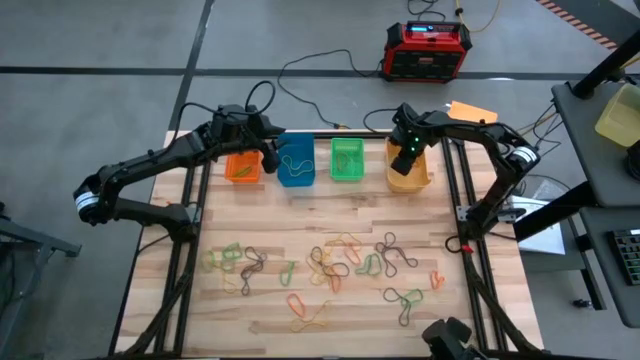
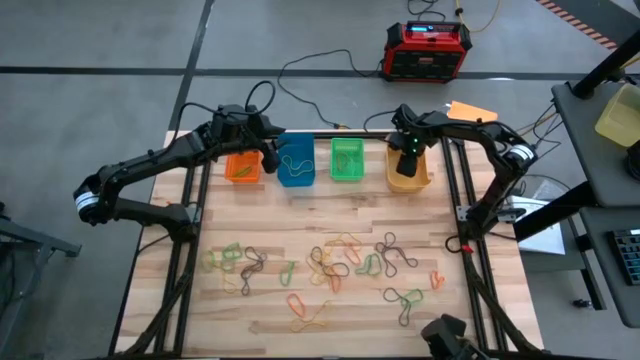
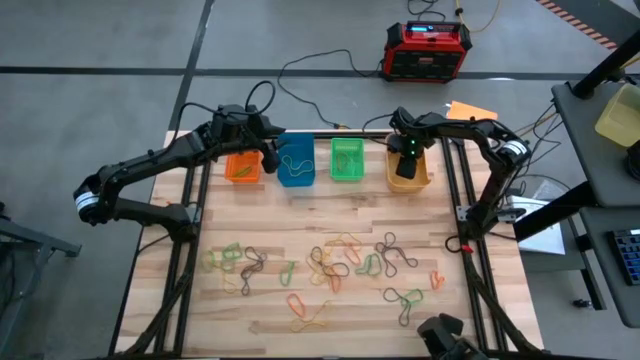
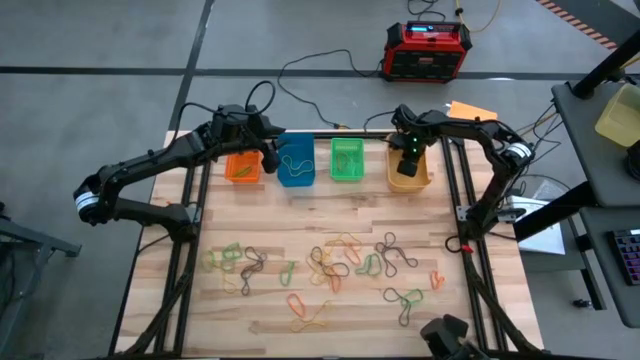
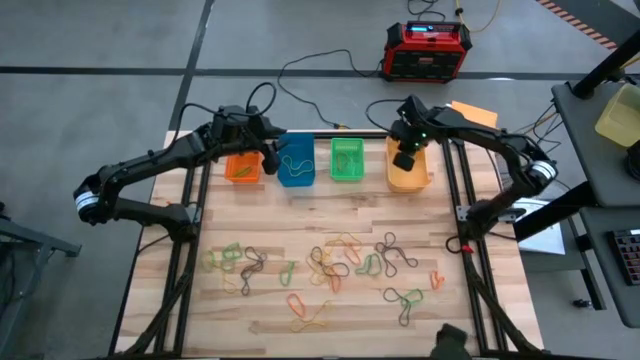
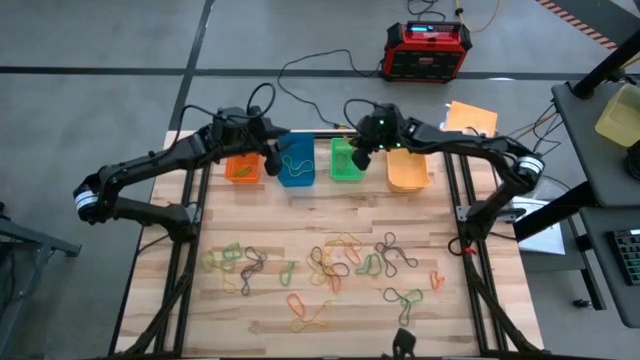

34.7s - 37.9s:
Task: Sort rubber bands into baskets
Put the orange rubber band from the light orange bin into the green bin

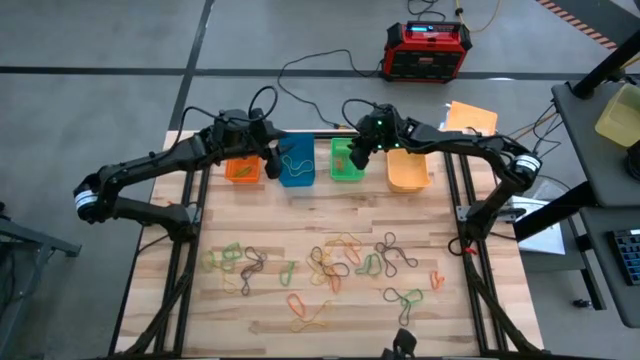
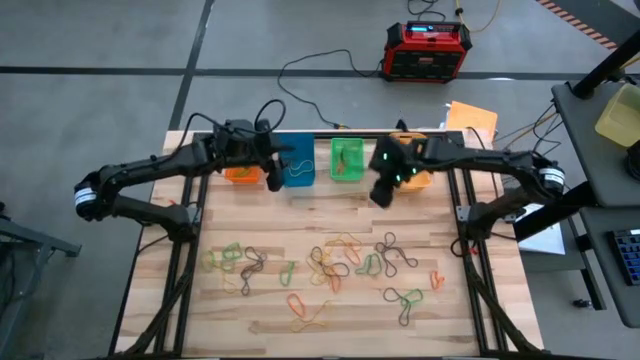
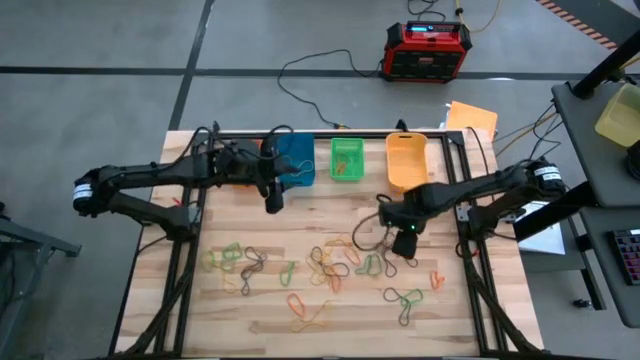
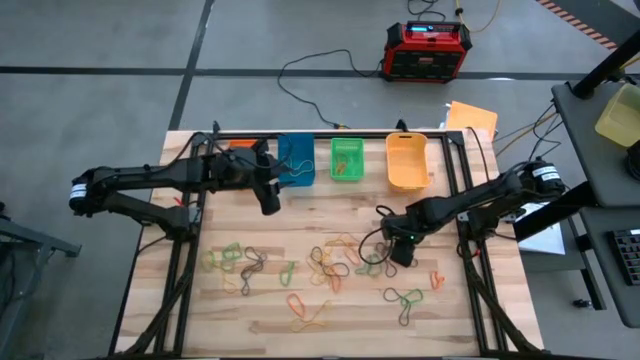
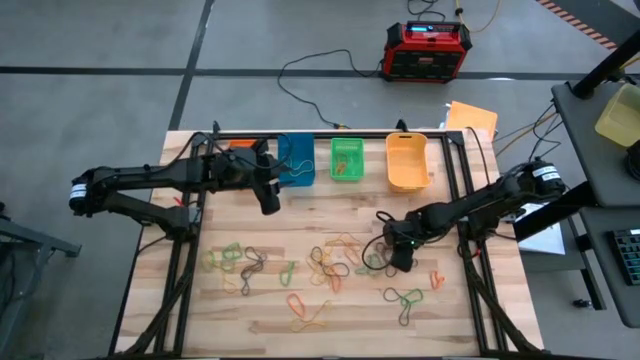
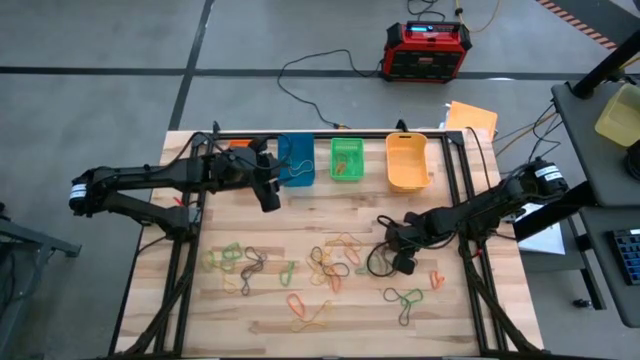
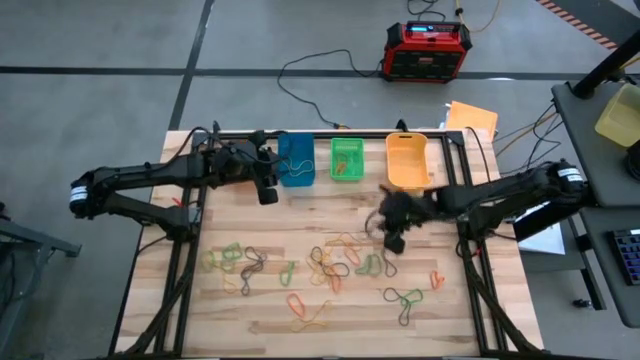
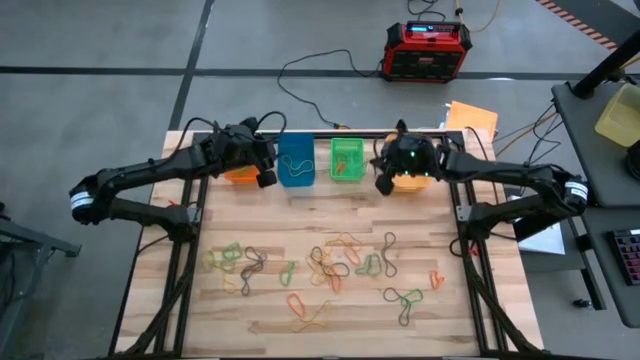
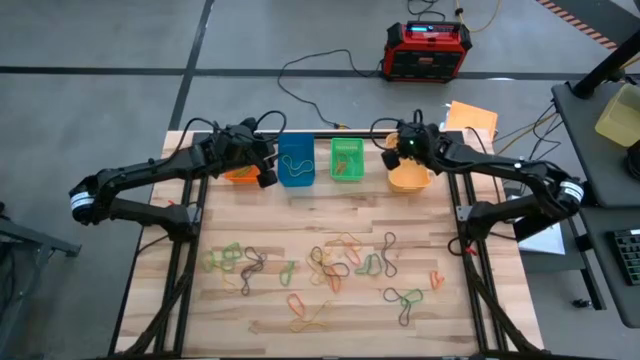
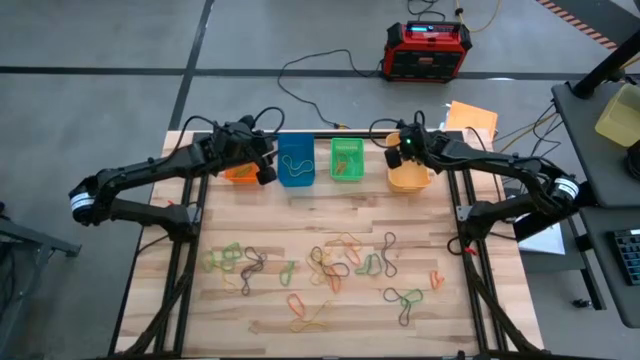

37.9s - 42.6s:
Put the purple rubber band into the light orange bin

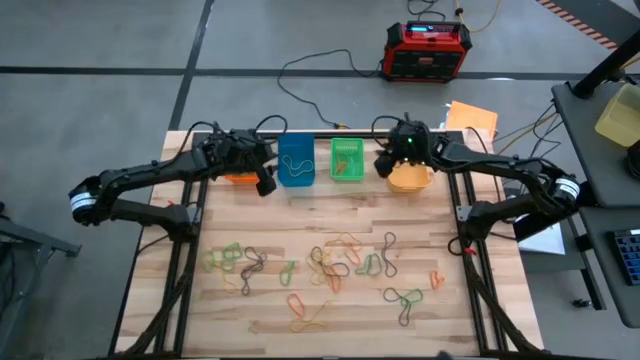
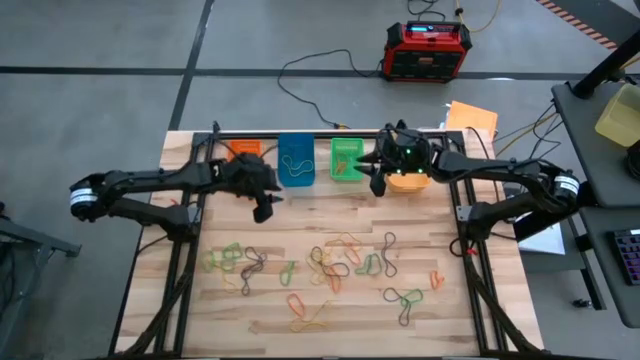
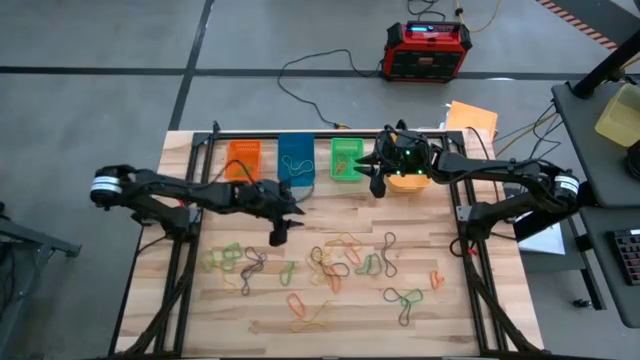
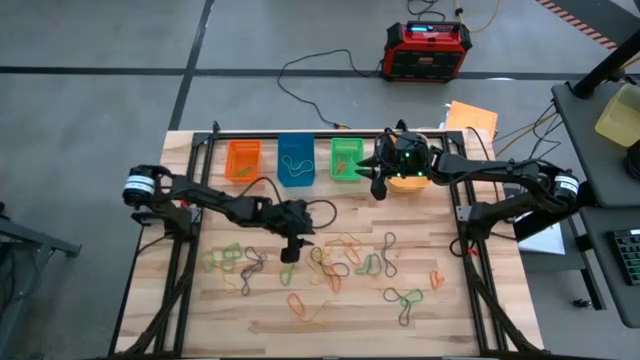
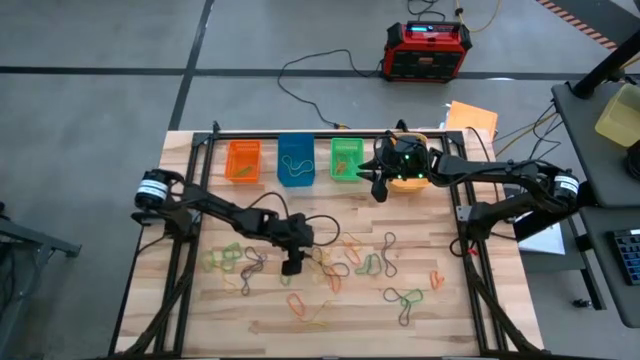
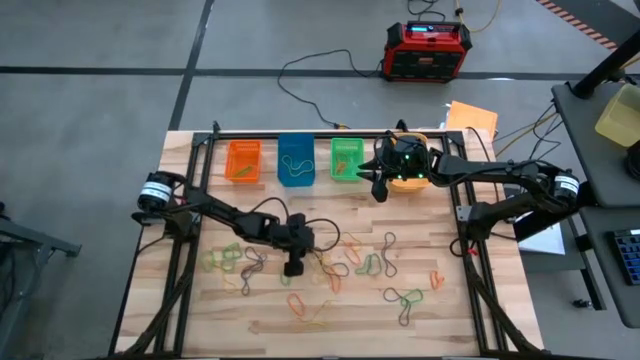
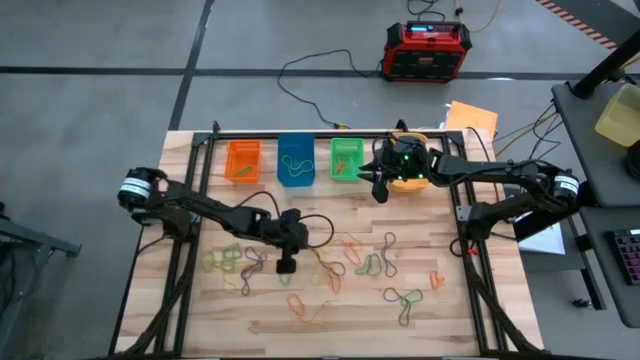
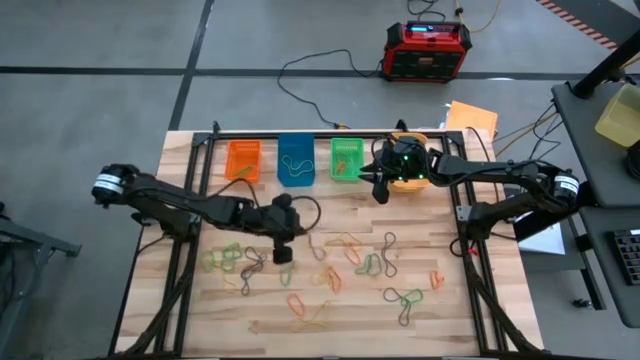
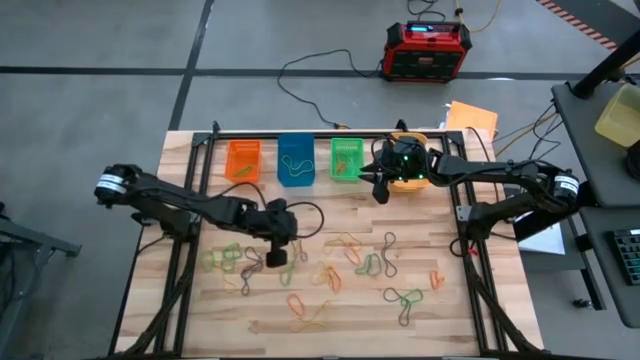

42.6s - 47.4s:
Put the purple rubber band into the light orange bin

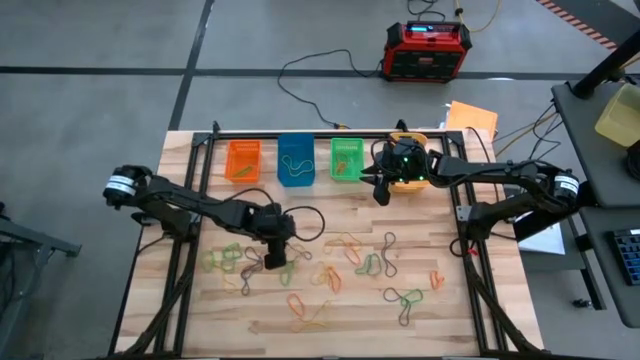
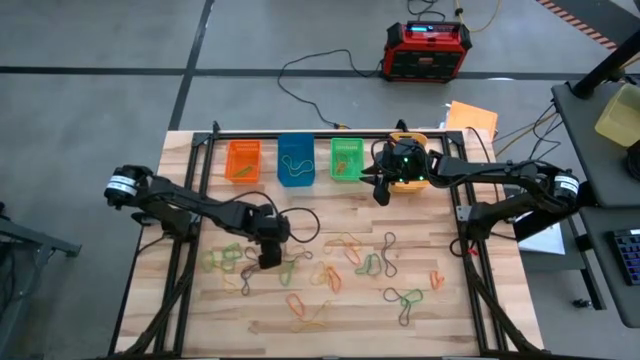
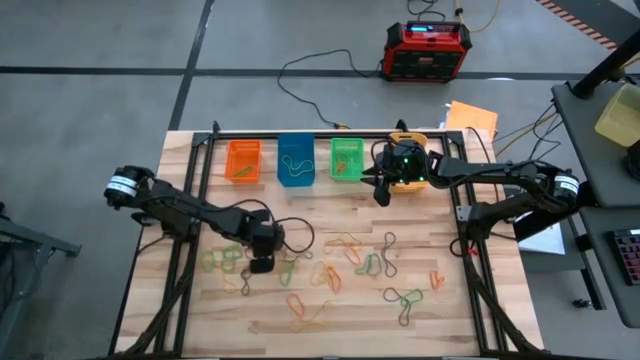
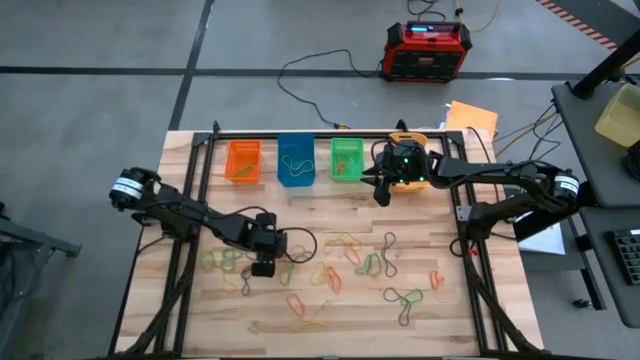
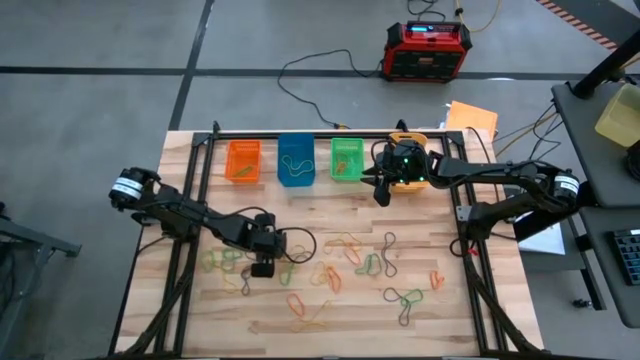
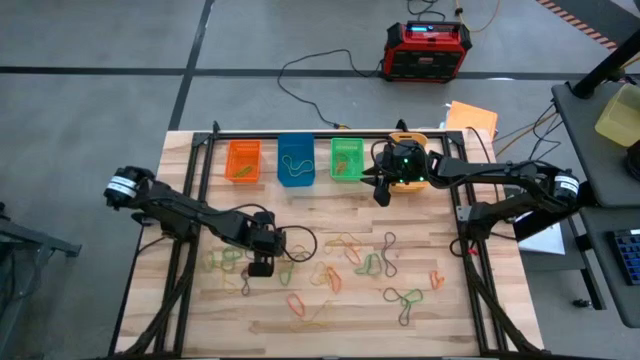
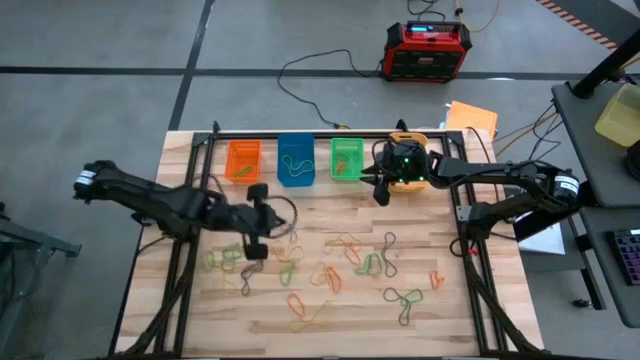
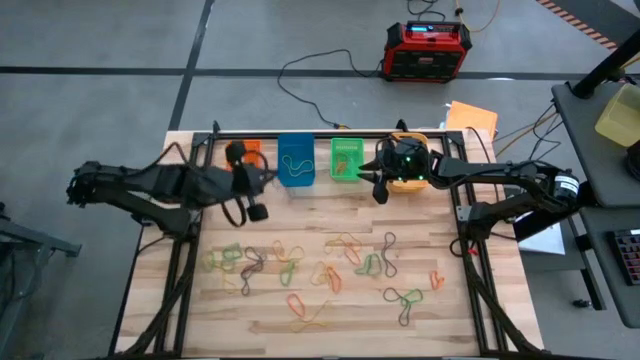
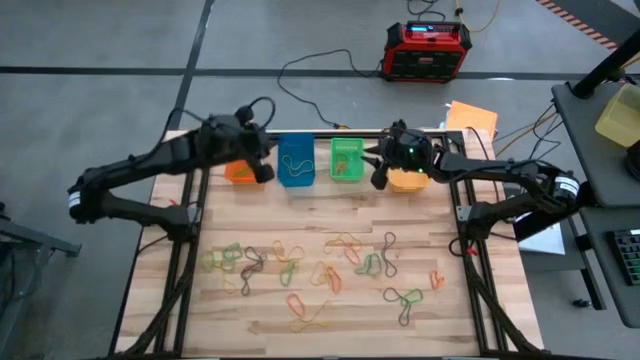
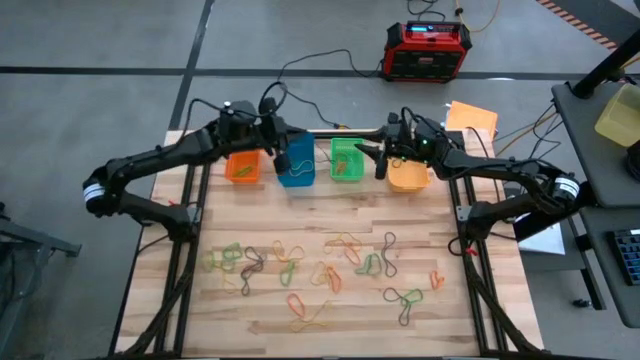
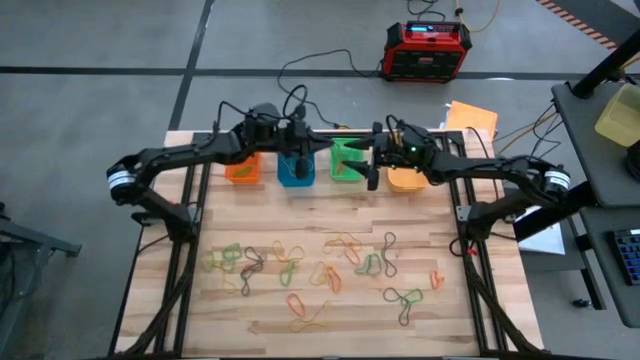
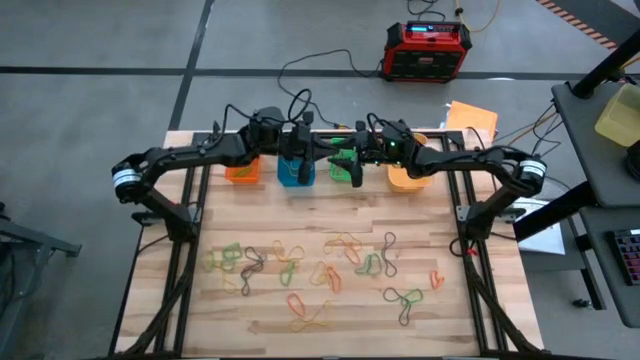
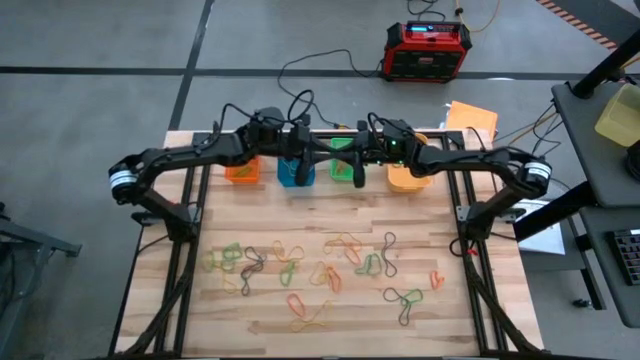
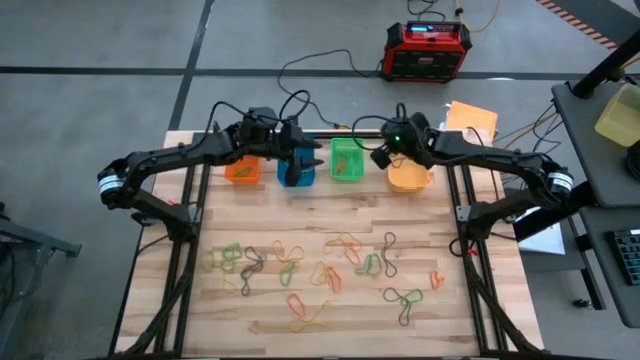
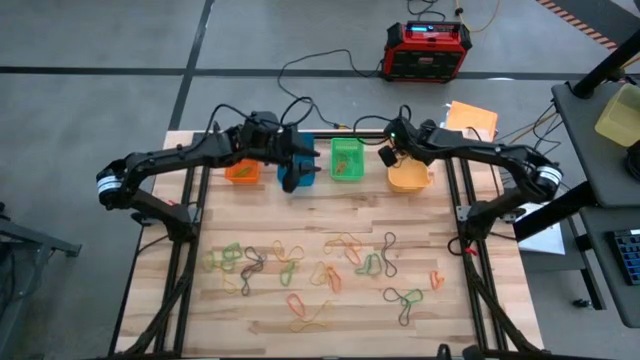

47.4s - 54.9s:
Put the purple rubber band into the light orange bin

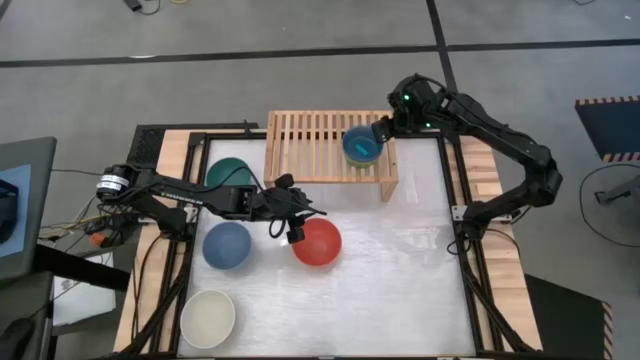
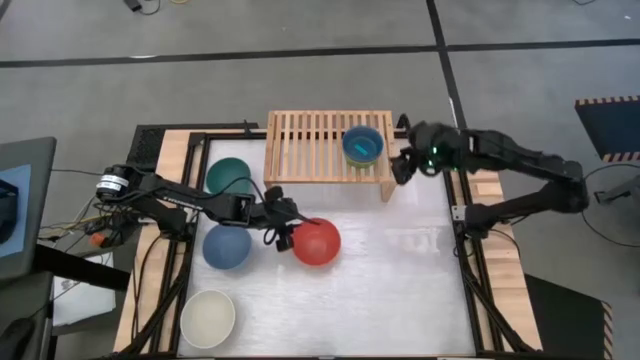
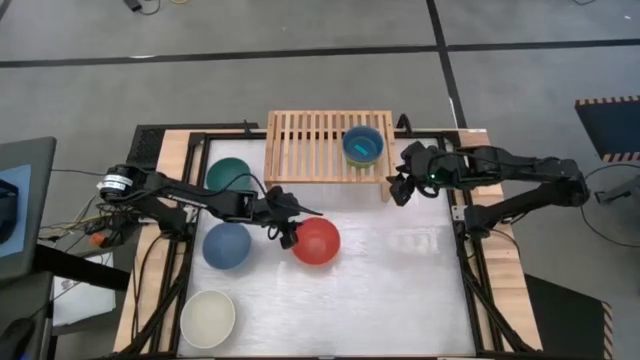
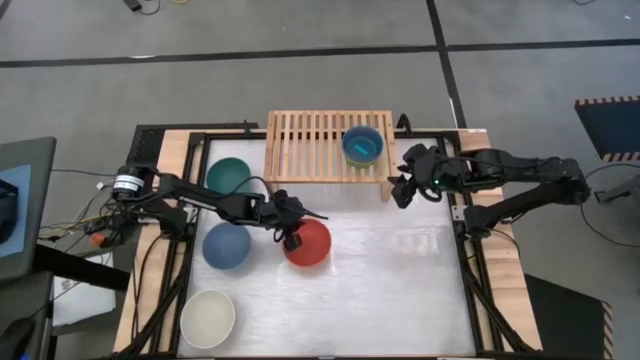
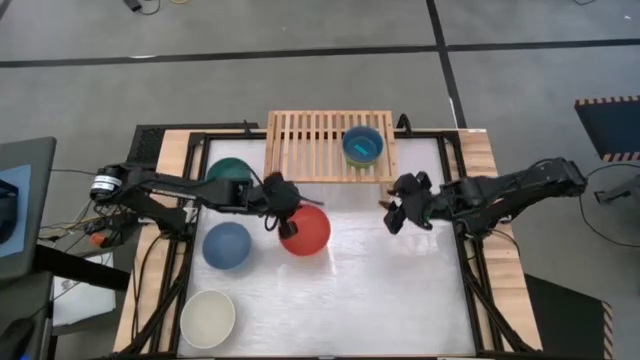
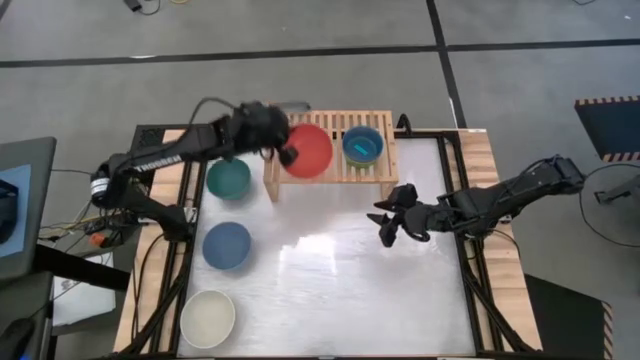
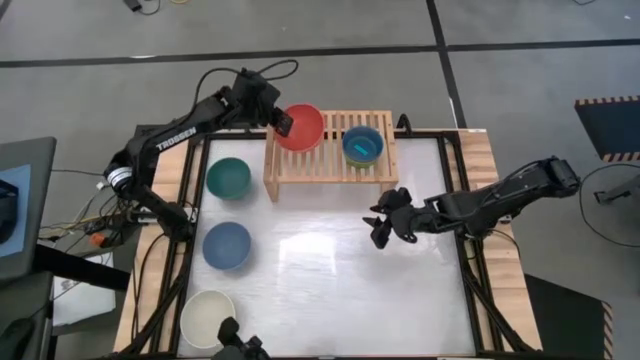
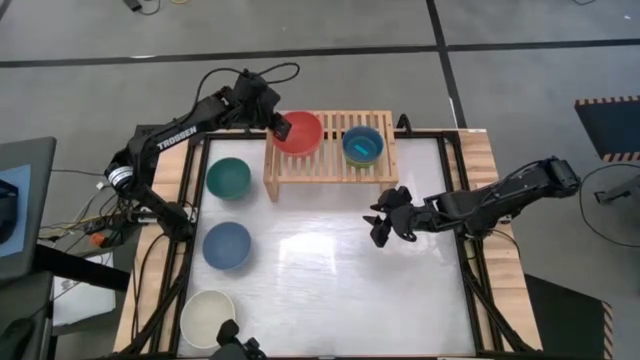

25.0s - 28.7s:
Task: Place and stack bowls onto a shelf
Put the orange bowl on the shelf
